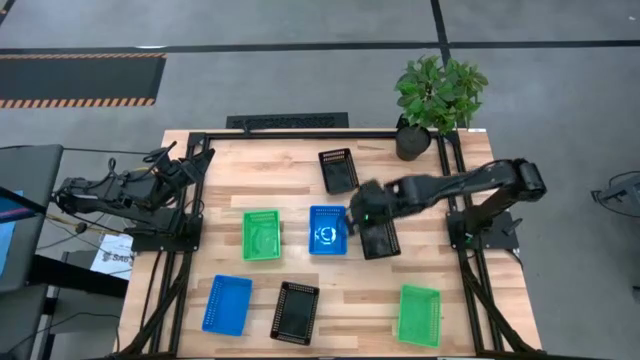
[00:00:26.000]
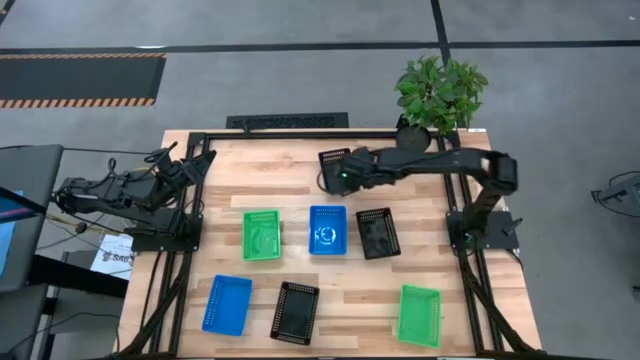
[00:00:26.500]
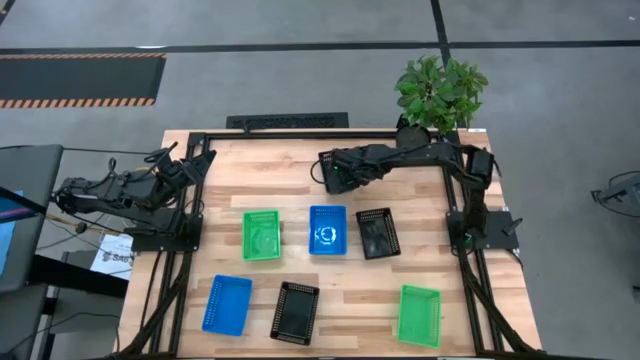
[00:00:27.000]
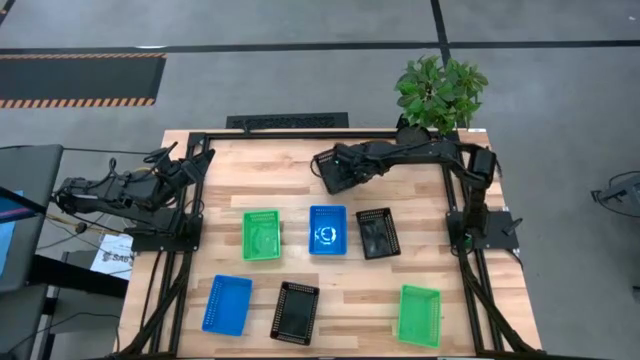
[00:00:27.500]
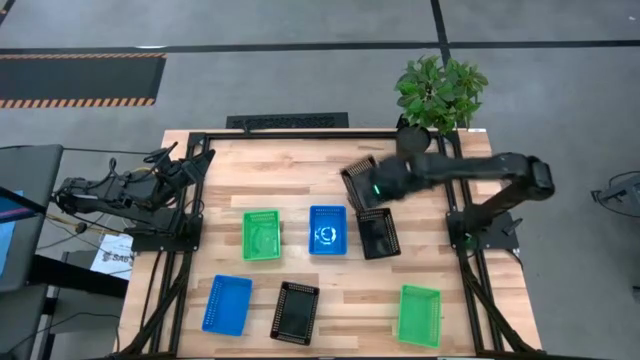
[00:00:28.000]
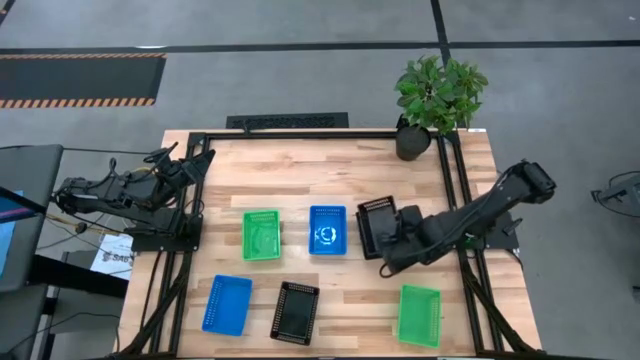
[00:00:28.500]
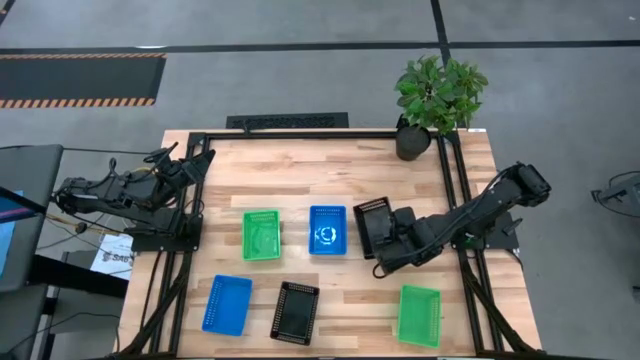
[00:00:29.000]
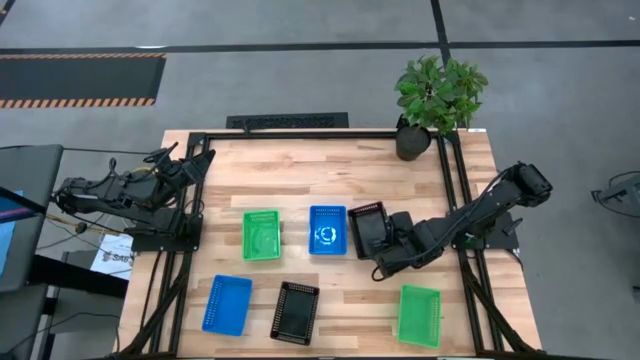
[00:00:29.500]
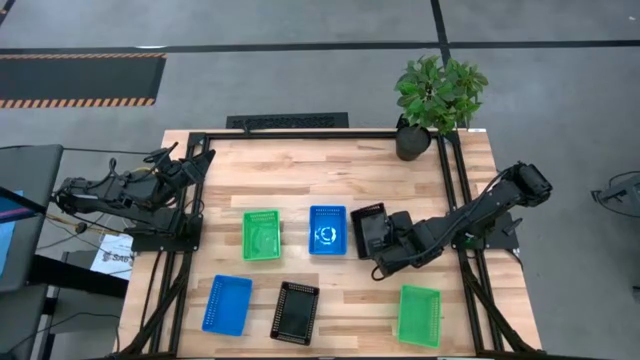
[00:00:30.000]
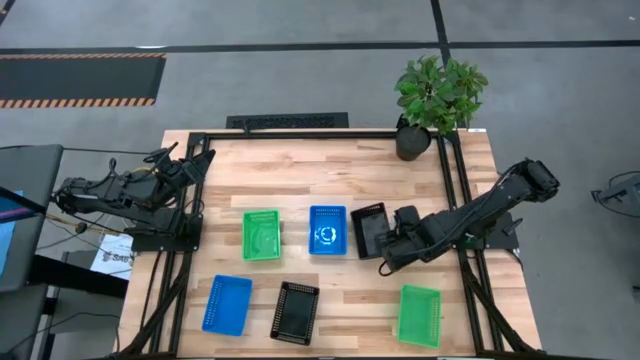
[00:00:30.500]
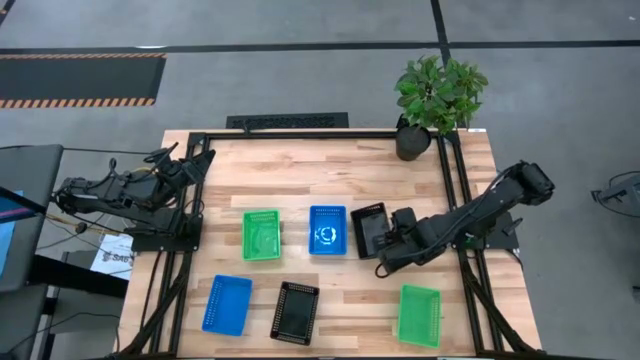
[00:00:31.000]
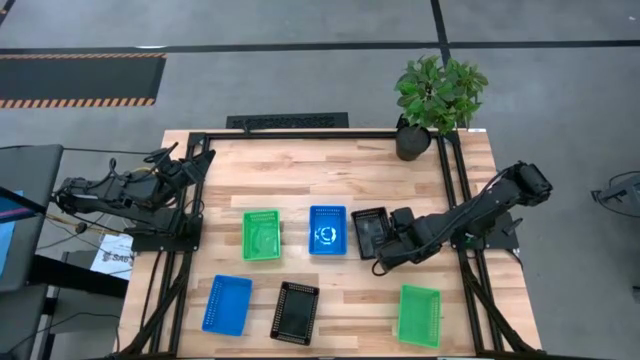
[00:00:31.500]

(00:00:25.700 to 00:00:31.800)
Stack the top black bin on top of the middle black bin

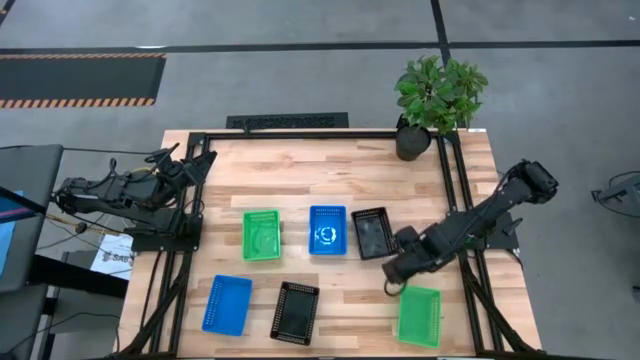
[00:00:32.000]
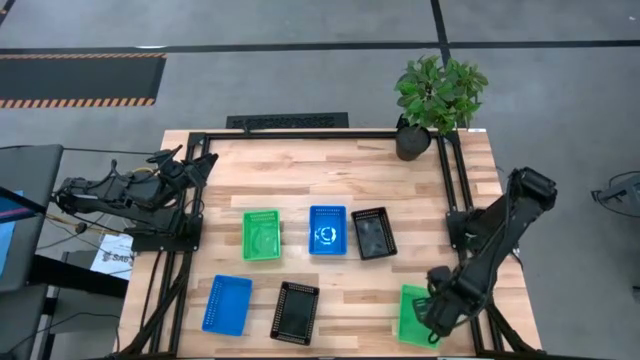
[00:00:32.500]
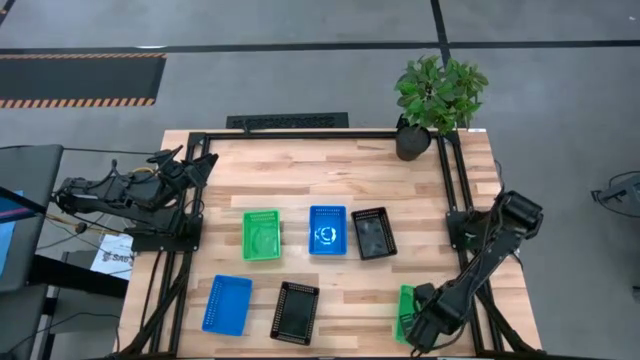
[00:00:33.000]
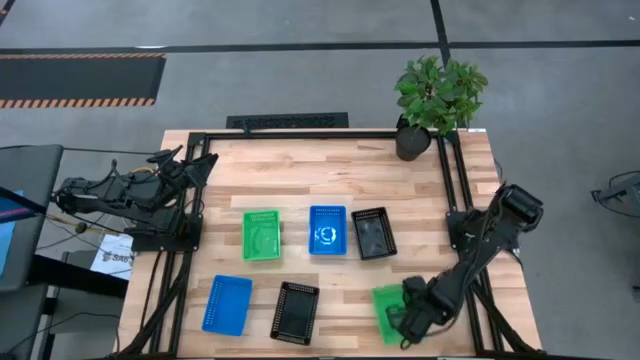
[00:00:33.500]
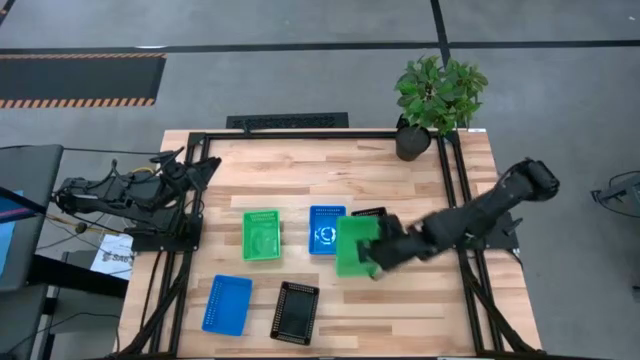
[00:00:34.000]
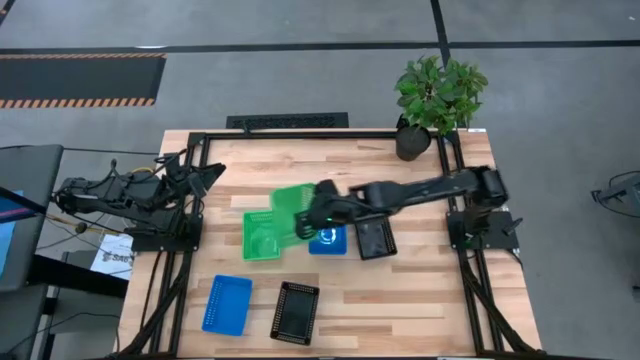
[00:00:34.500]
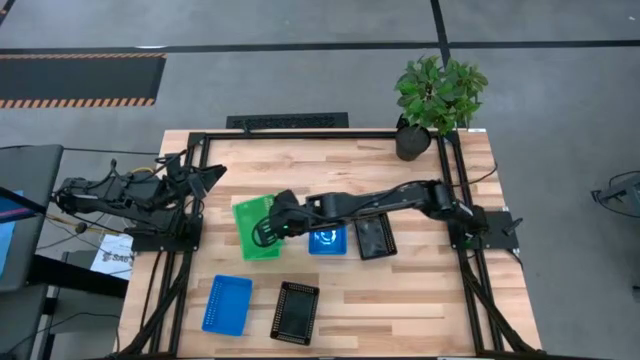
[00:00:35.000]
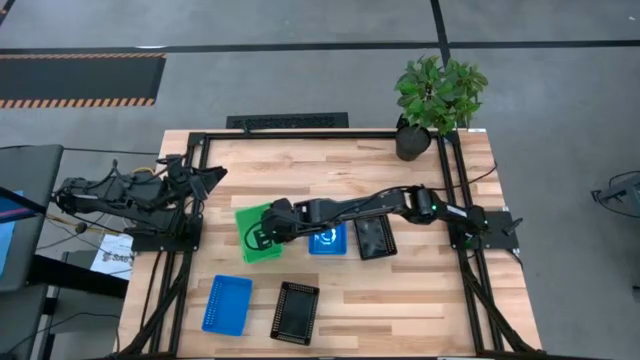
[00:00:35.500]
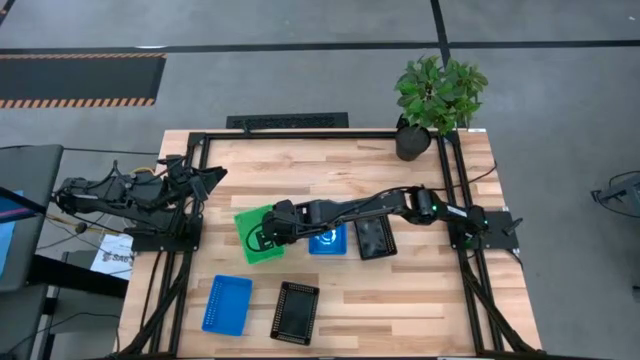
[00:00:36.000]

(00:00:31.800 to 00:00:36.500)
Stack the right green bin on top of the green bin

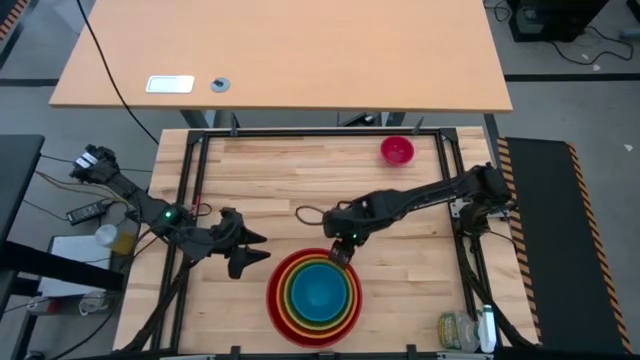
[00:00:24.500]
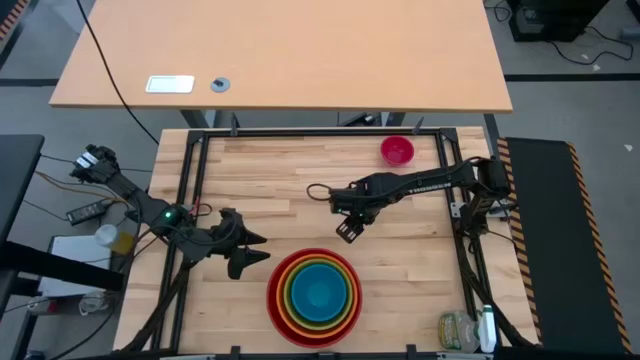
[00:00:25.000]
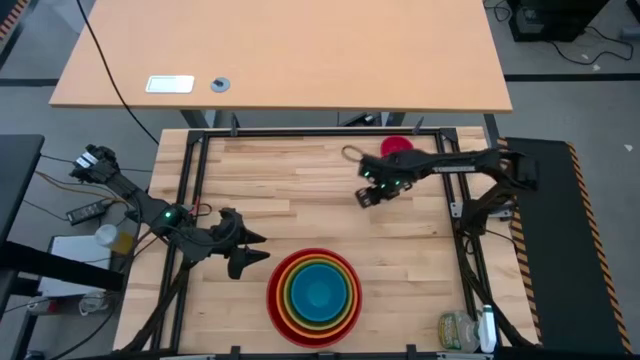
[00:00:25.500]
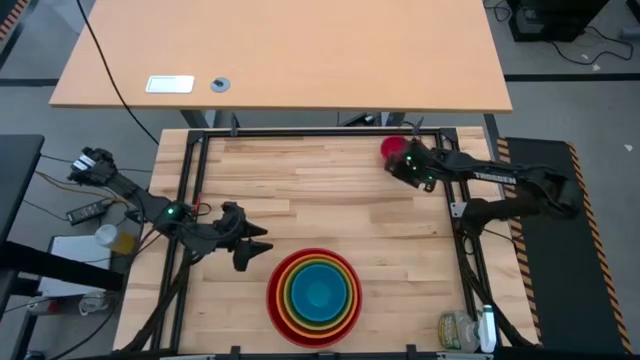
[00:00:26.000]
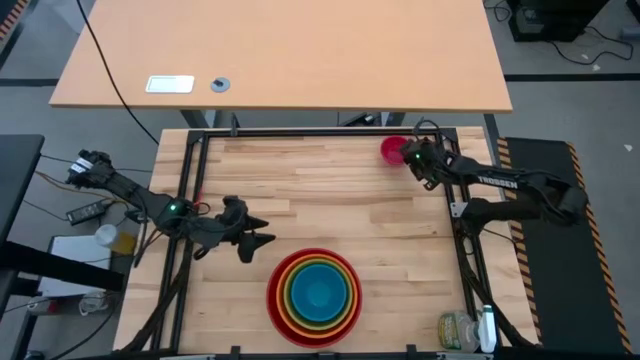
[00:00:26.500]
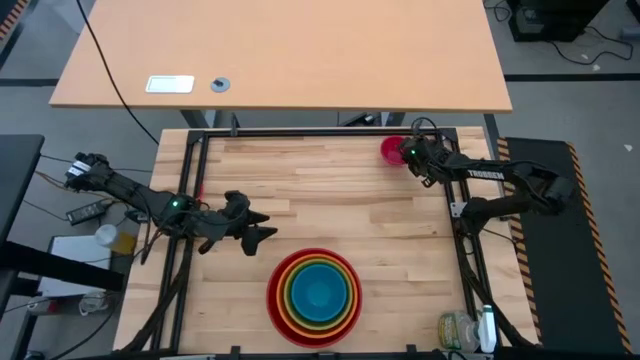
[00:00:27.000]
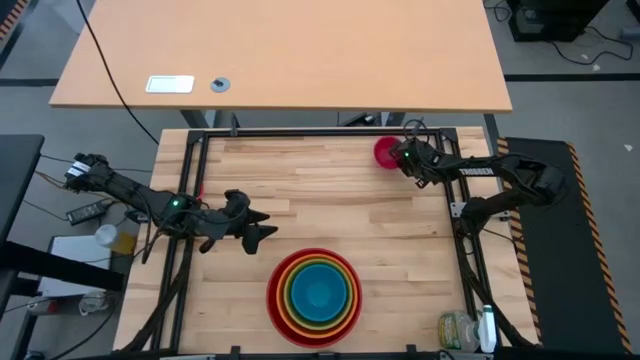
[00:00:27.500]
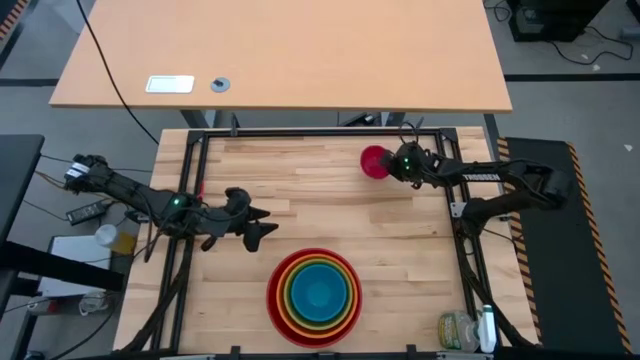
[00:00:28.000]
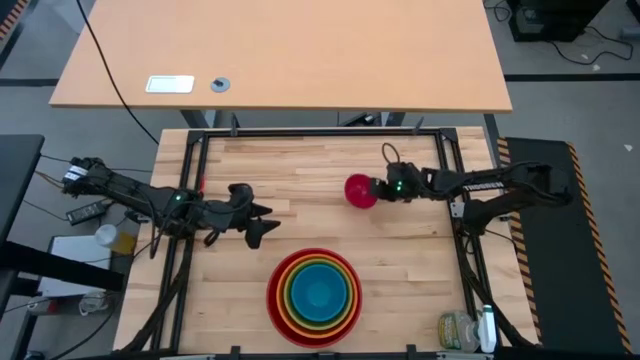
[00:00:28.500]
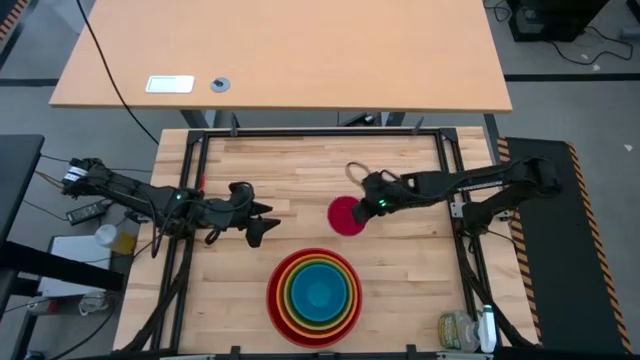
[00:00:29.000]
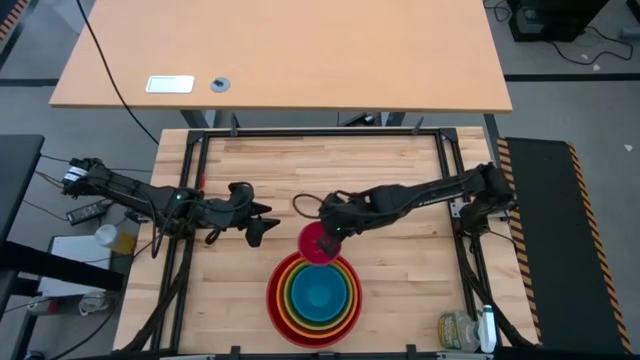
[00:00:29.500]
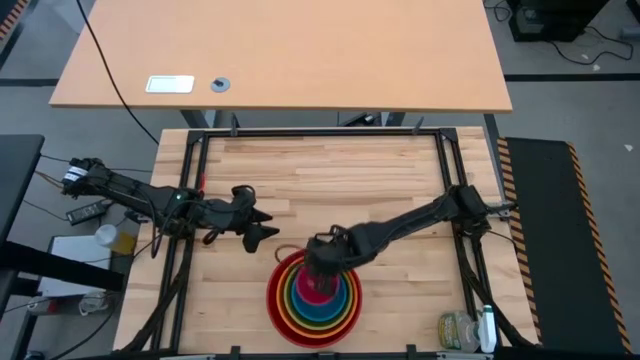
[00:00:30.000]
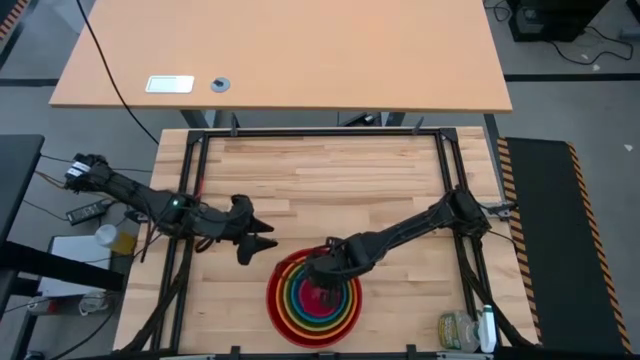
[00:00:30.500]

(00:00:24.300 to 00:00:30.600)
Stack the pink bowl on top of the blue bowl
